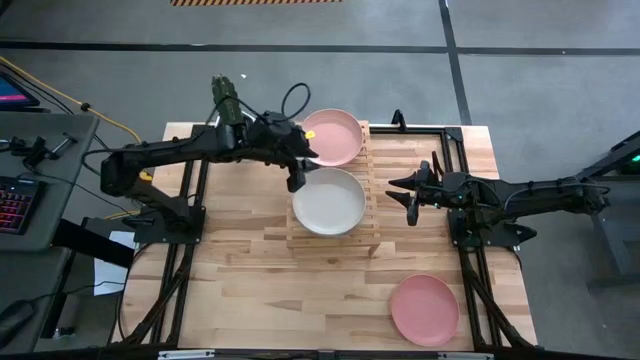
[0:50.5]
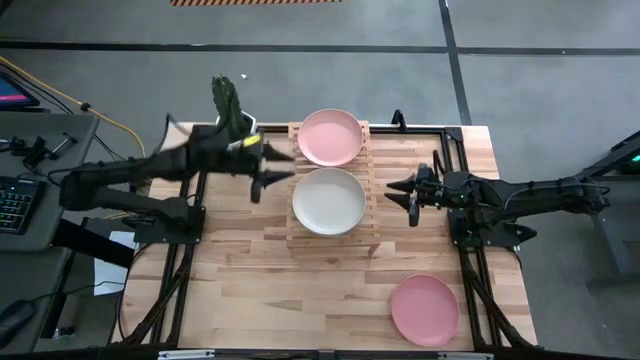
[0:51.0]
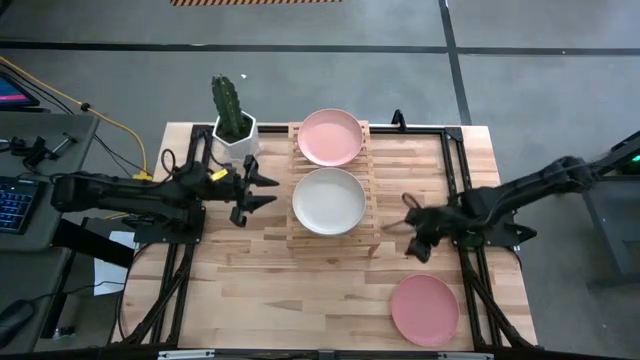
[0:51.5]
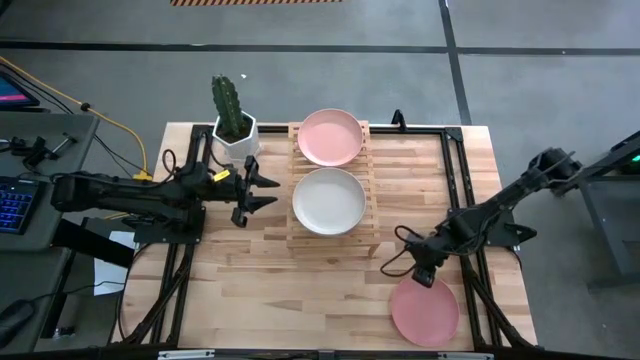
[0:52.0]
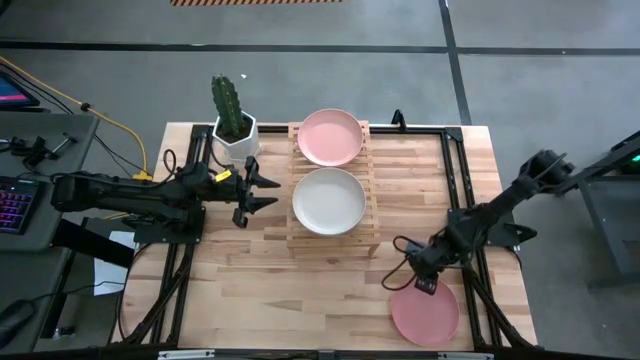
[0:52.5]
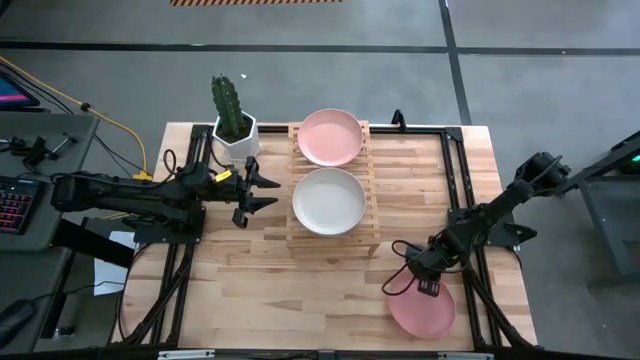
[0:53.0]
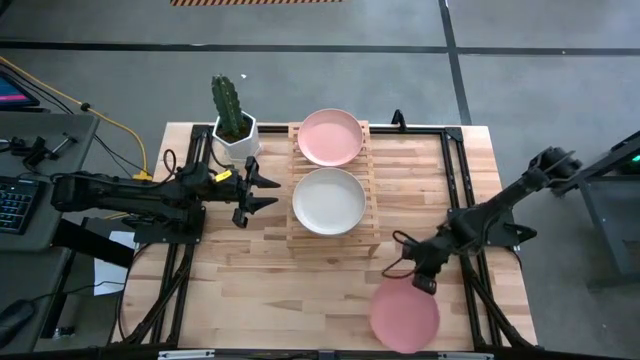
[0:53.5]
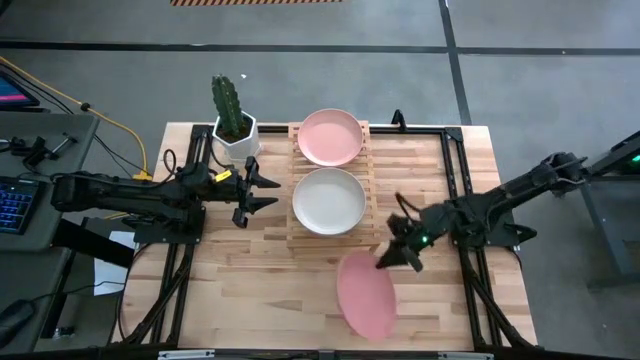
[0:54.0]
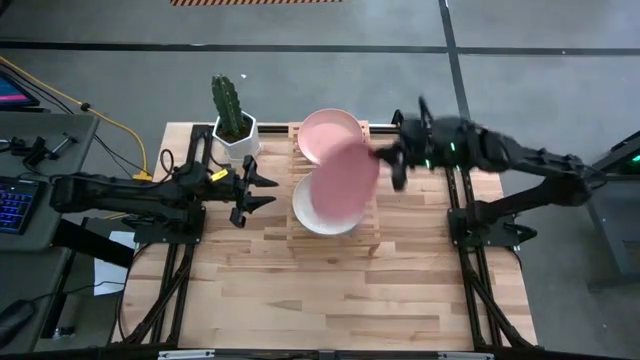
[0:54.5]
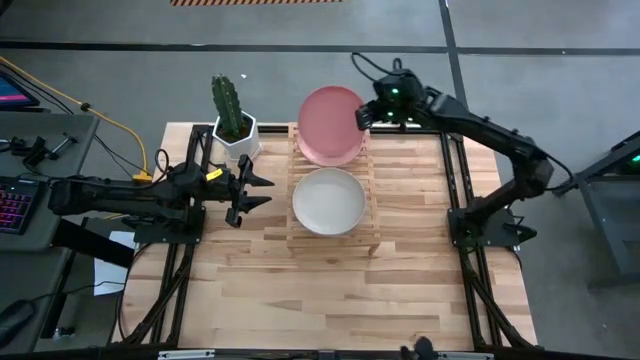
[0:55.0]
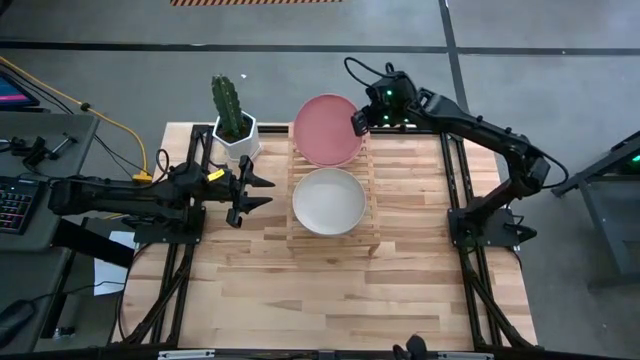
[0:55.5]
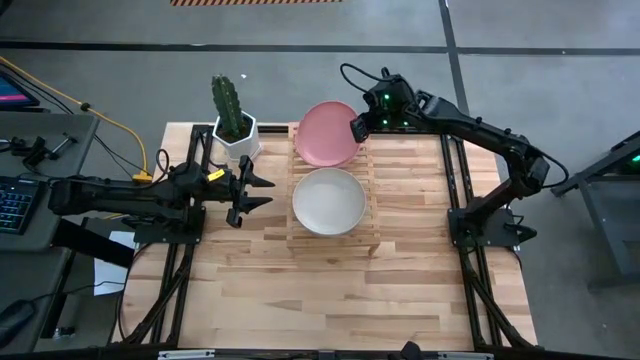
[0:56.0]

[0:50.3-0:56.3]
Task: Place and stack plates onto a shelf
Stack the pink plate on top of the light pink plate on the shelf

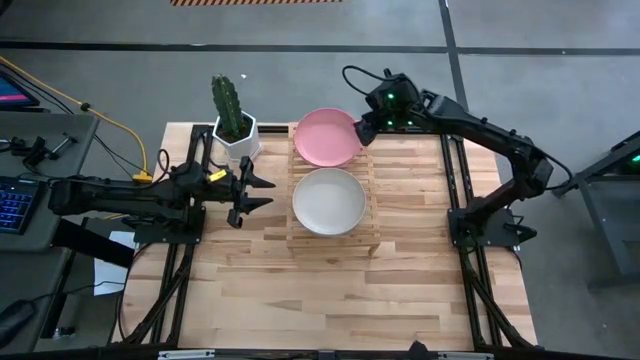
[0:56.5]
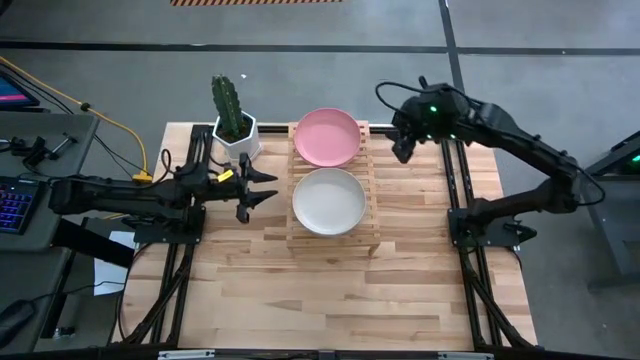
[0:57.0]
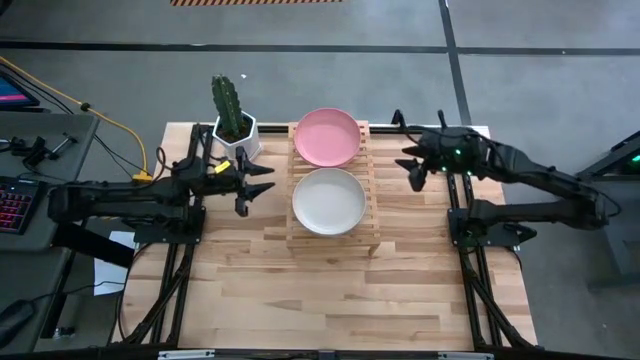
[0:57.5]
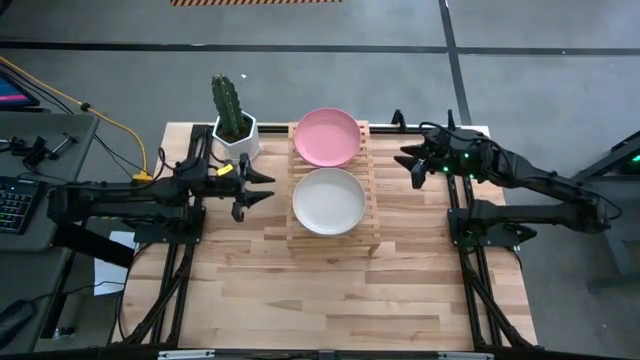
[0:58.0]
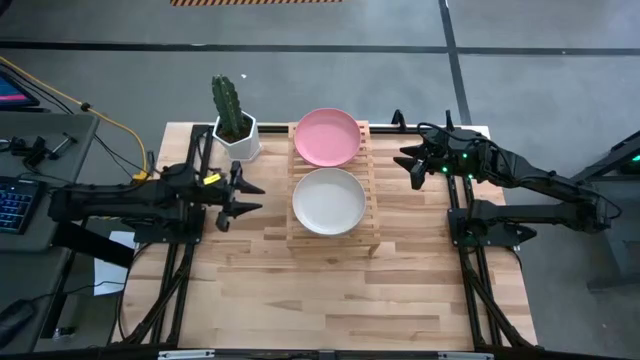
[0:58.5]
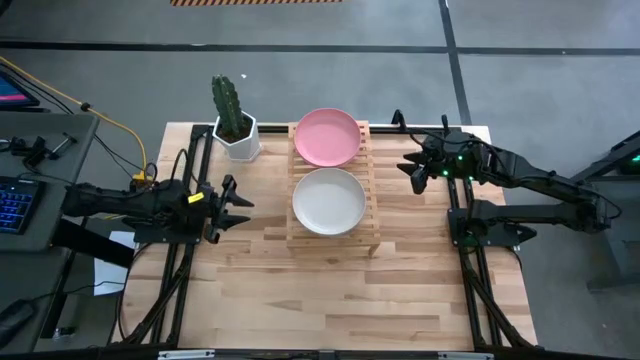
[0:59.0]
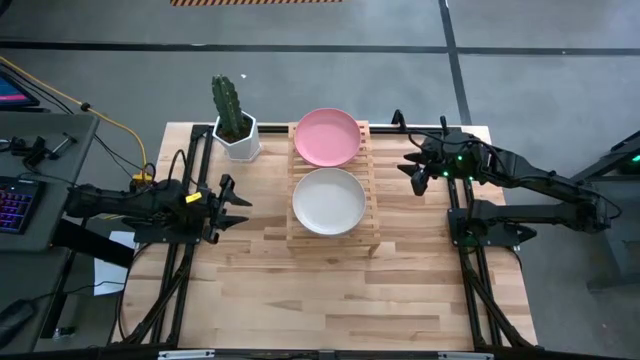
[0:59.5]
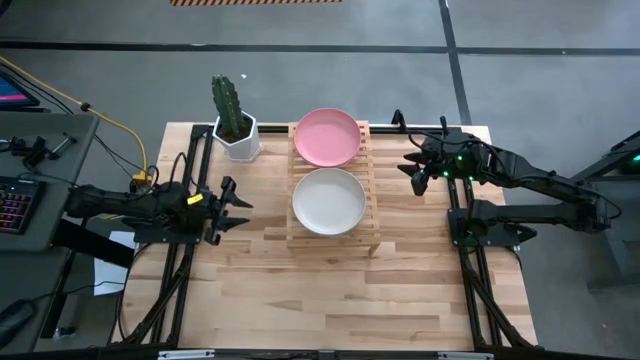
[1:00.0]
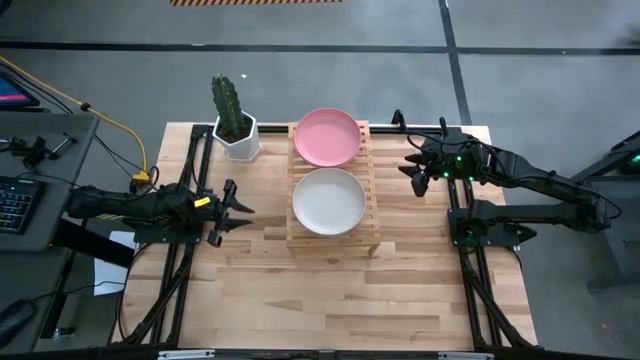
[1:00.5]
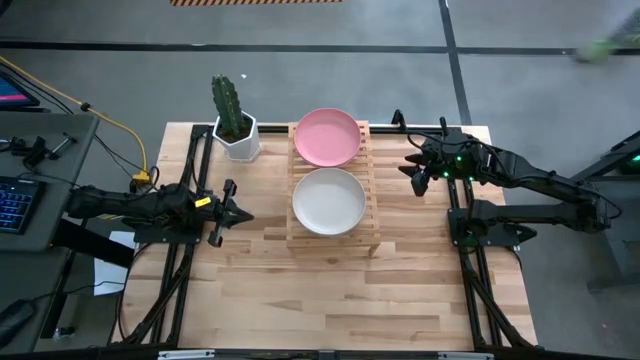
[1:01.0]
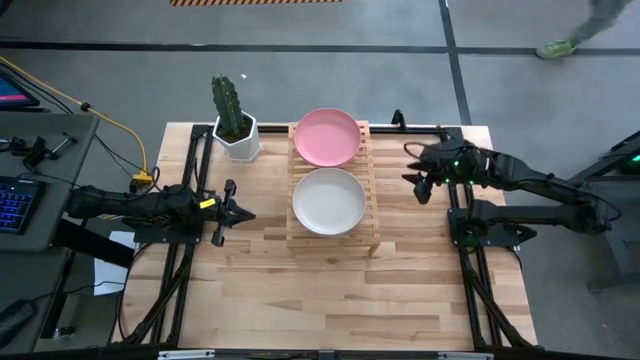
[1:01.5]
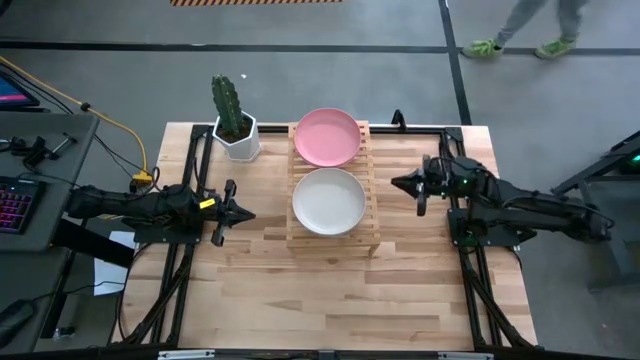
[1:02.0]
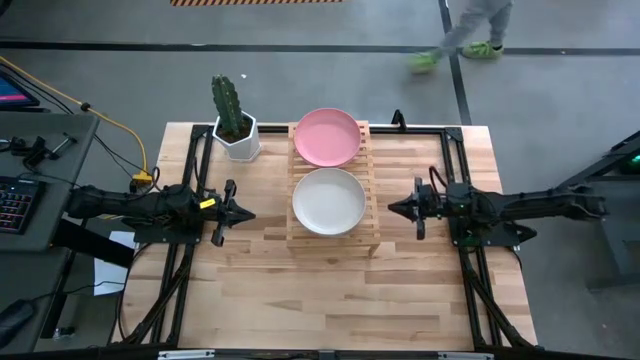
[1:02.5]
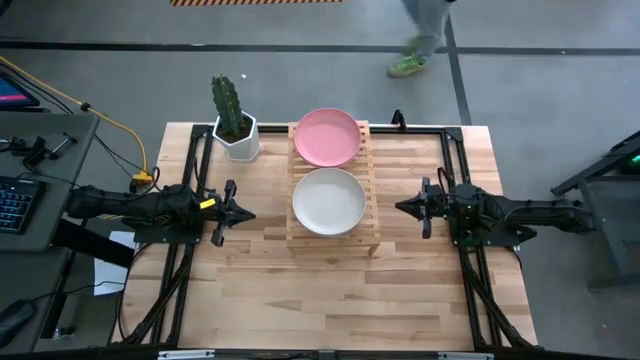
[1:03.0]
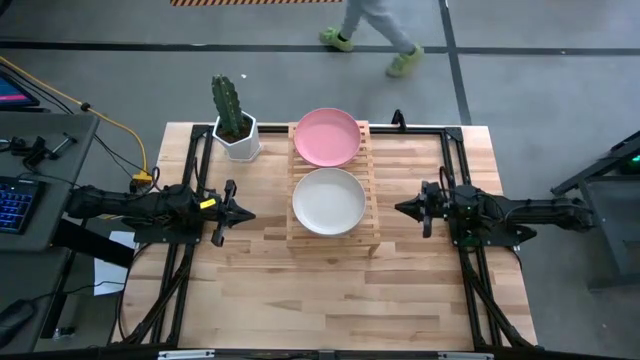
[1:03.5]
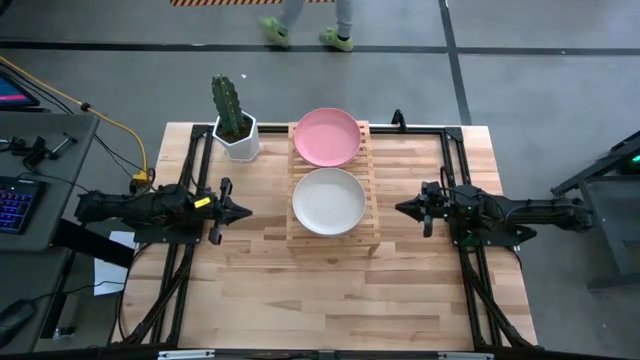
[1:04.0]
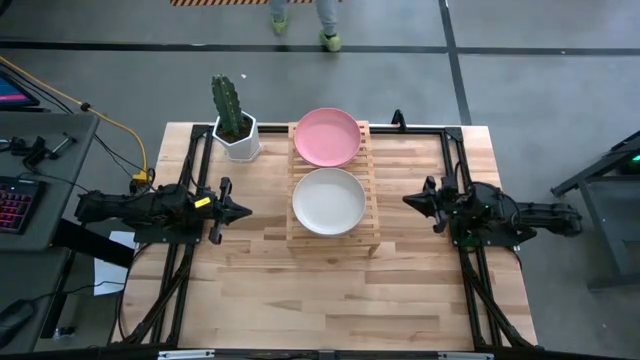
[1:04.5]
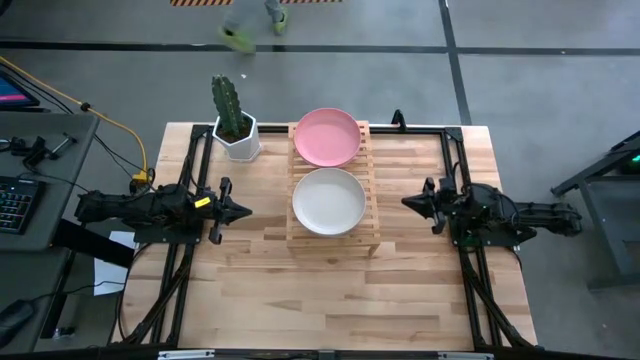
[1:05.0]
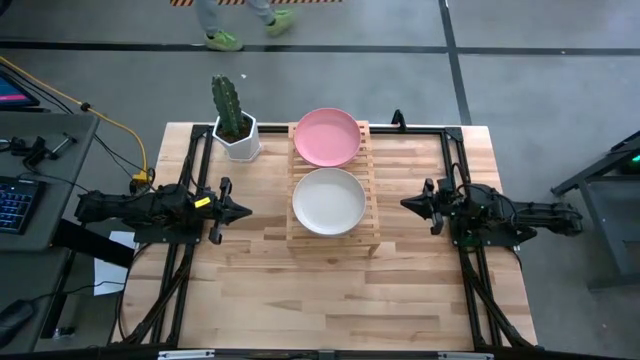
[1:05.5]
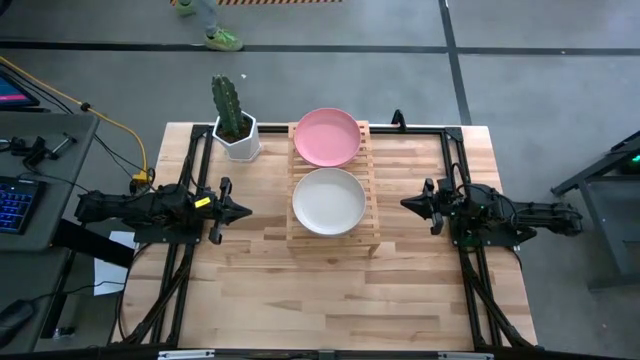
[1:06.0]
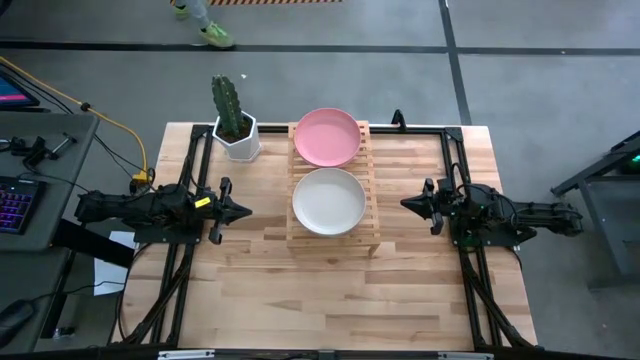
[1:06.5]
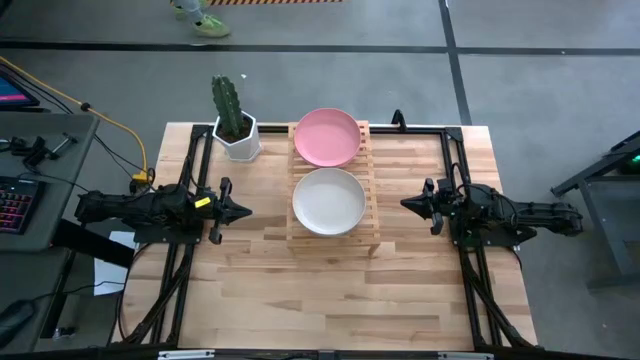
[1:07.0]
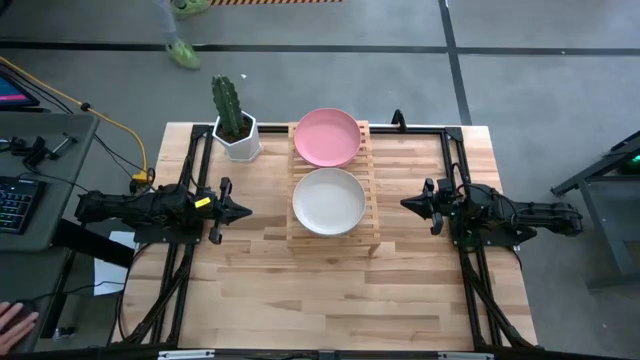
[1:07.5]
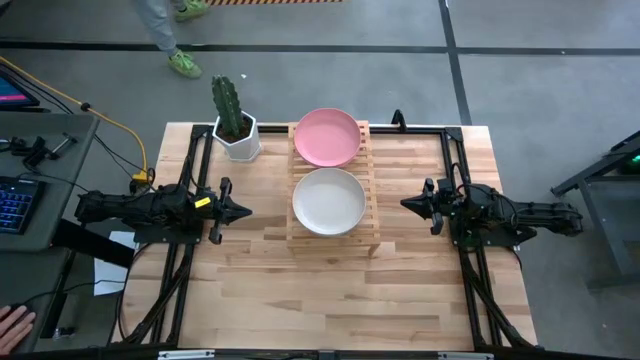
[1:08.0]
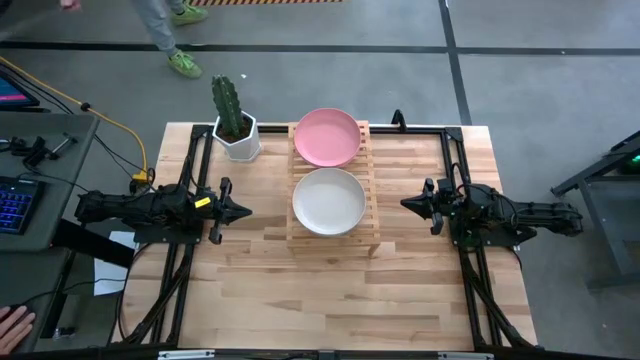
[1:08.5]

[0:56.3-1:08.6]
Return to Home Position
